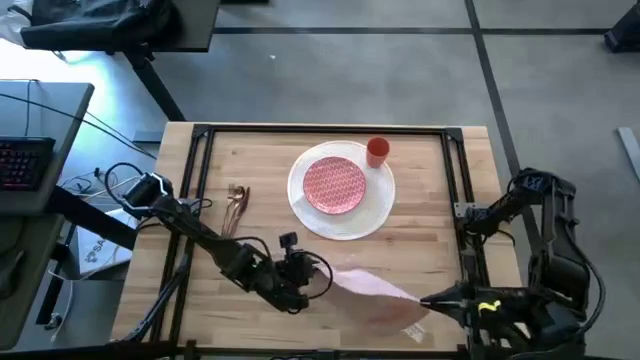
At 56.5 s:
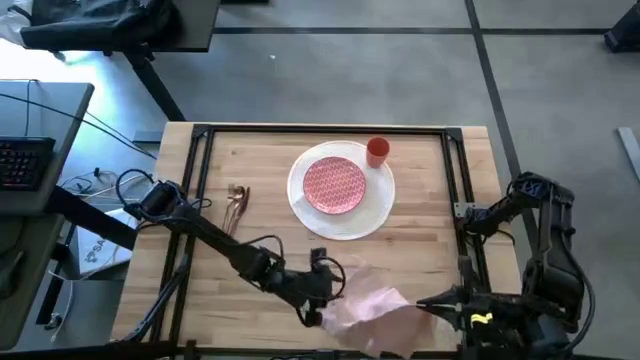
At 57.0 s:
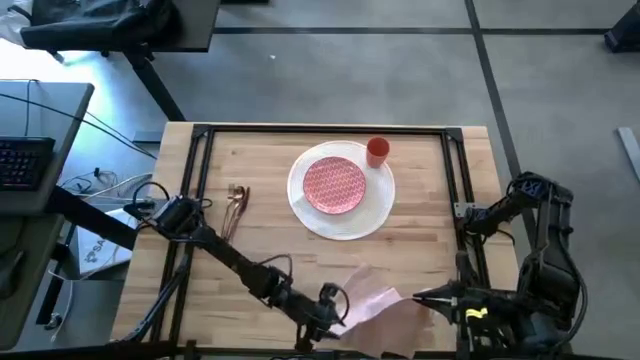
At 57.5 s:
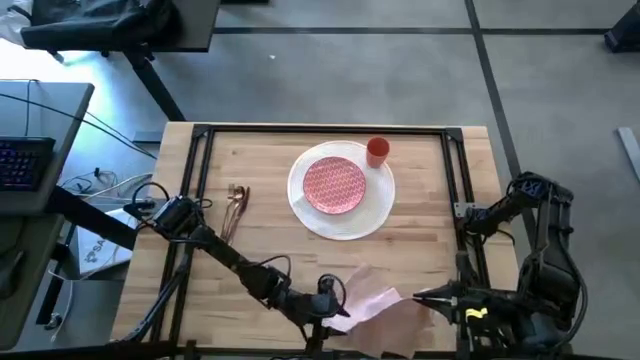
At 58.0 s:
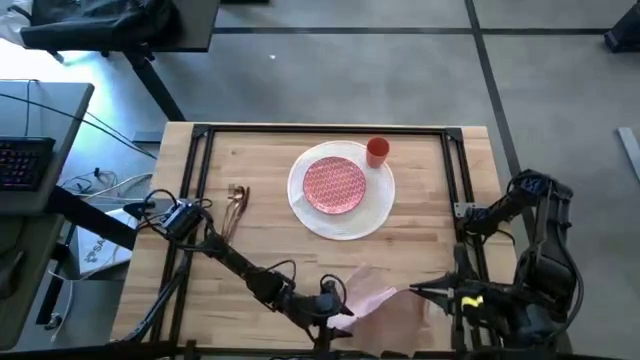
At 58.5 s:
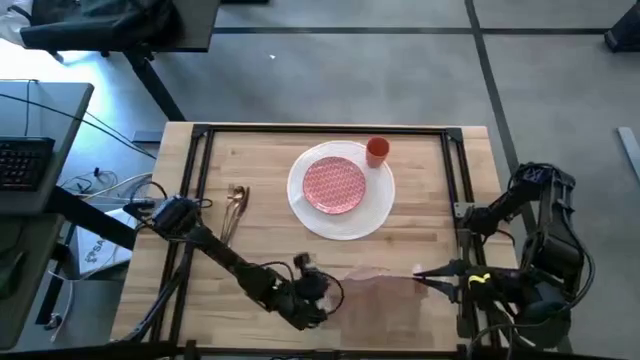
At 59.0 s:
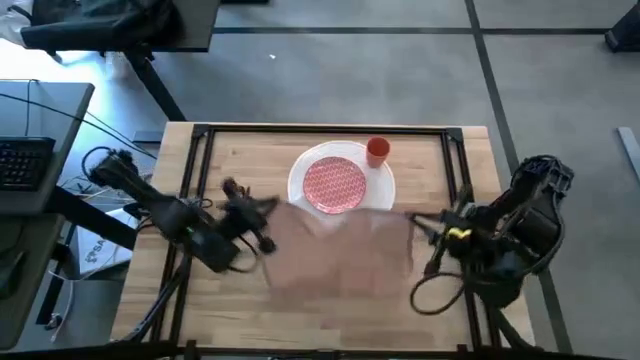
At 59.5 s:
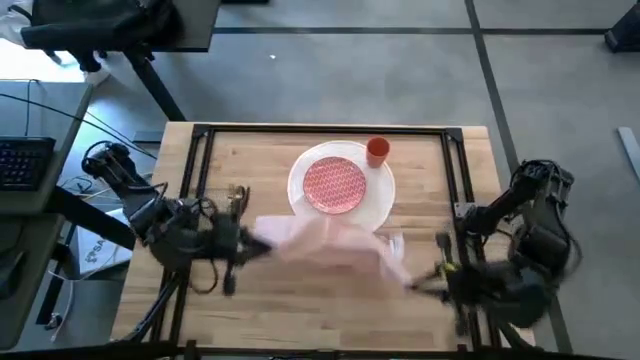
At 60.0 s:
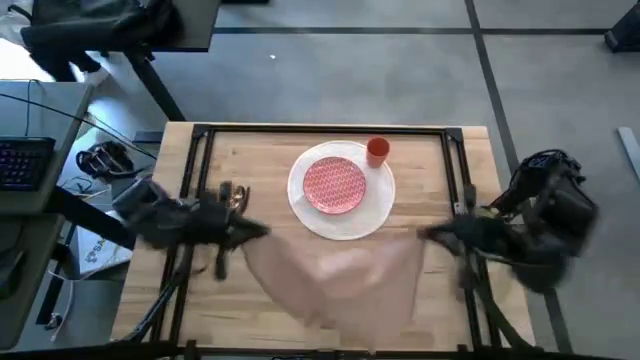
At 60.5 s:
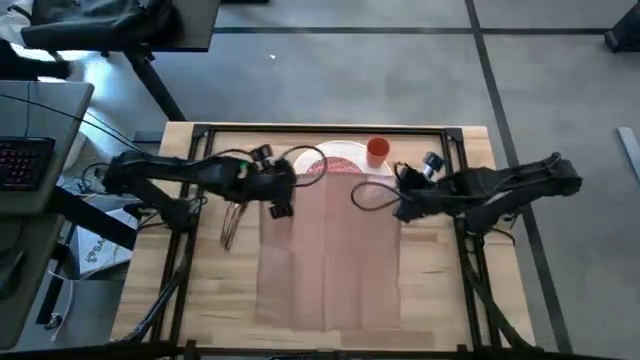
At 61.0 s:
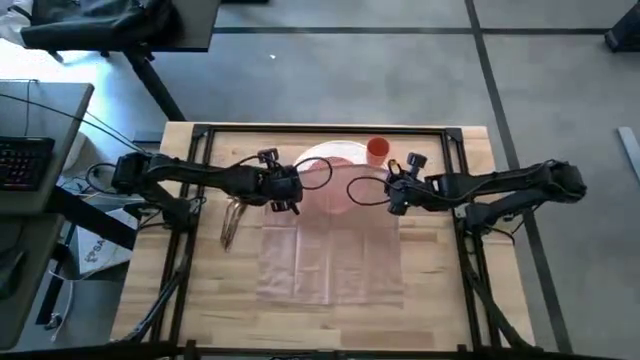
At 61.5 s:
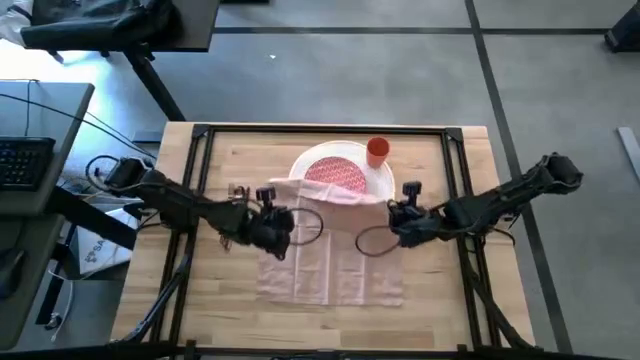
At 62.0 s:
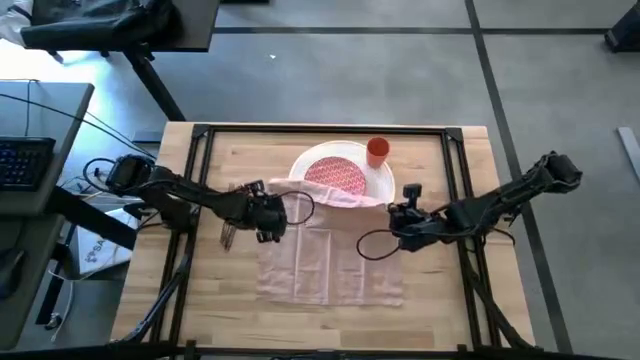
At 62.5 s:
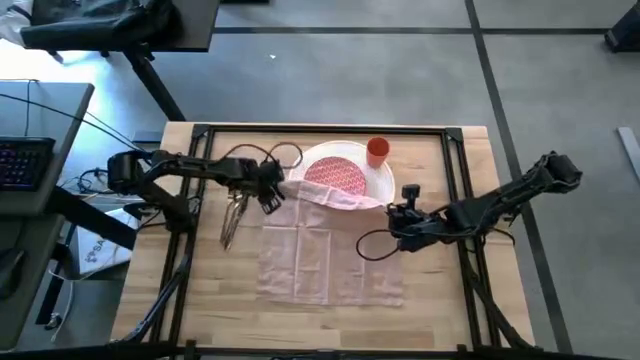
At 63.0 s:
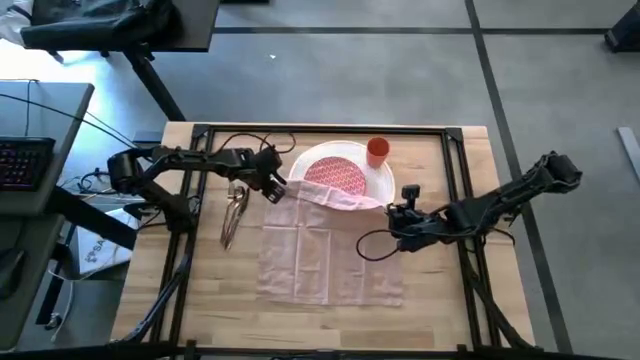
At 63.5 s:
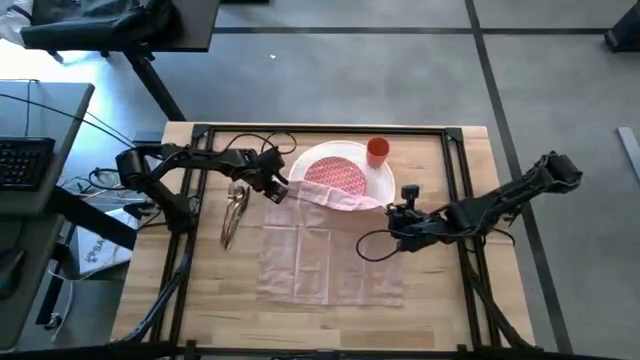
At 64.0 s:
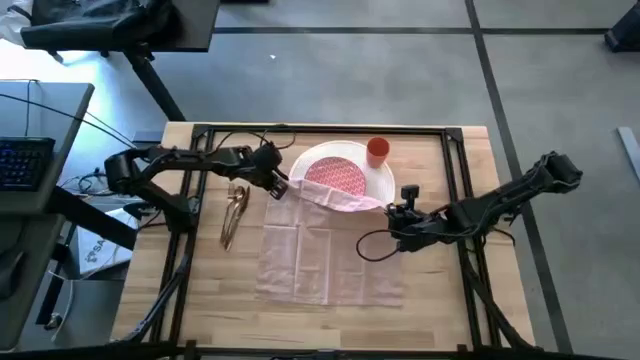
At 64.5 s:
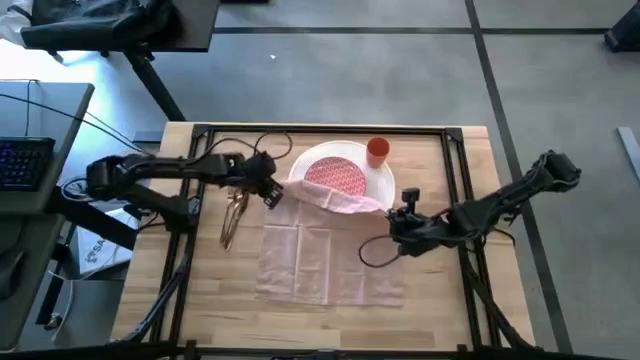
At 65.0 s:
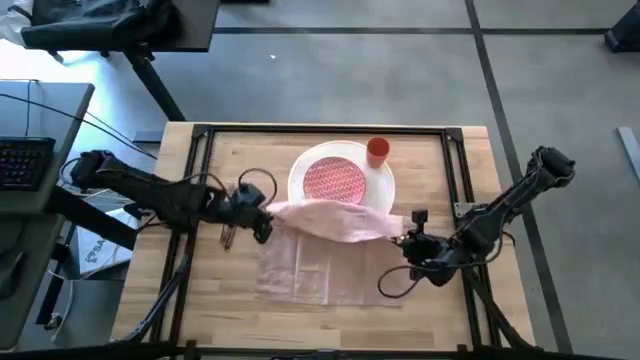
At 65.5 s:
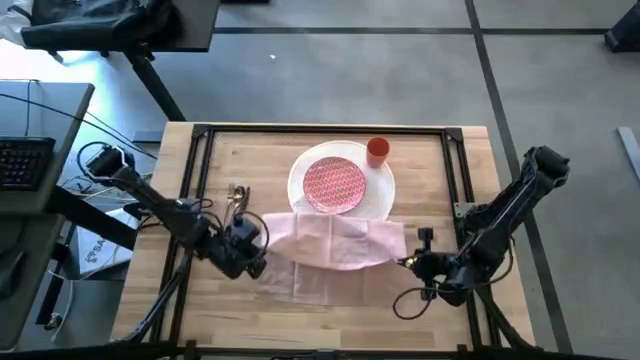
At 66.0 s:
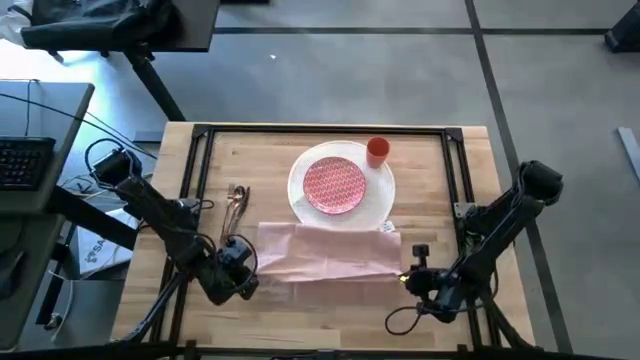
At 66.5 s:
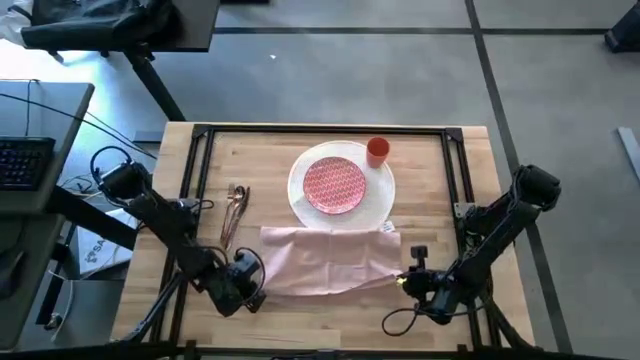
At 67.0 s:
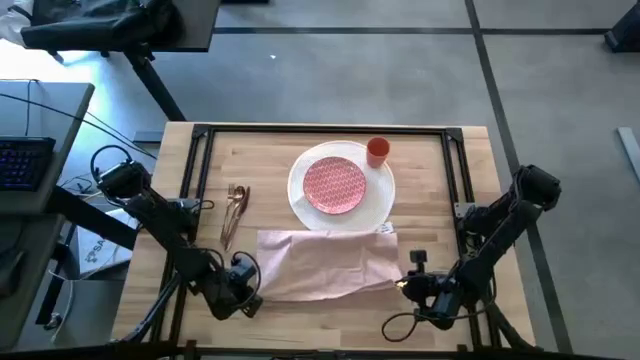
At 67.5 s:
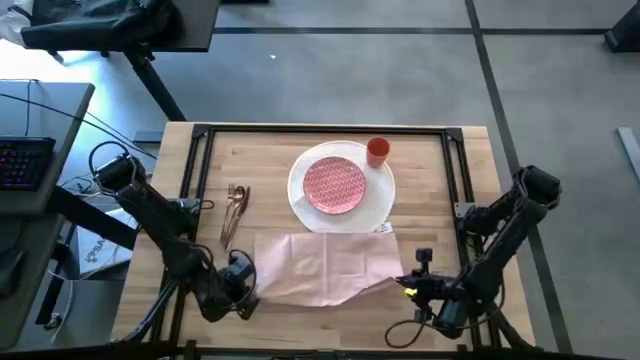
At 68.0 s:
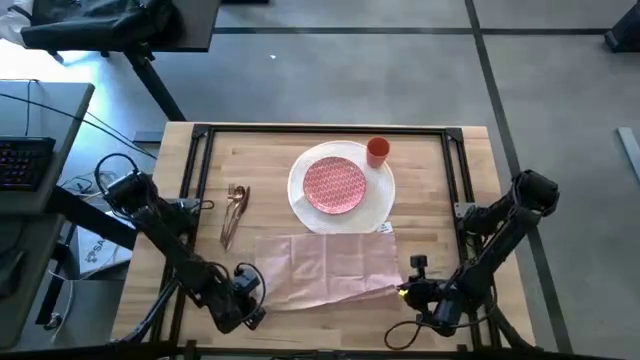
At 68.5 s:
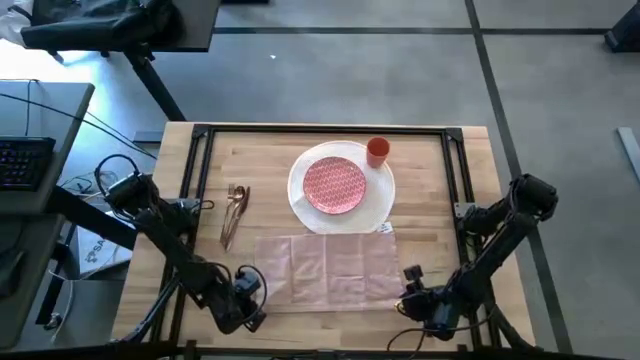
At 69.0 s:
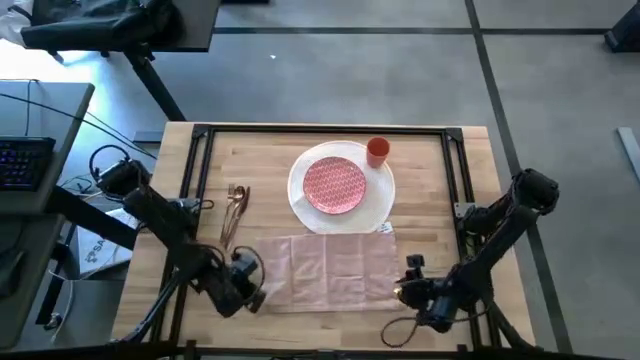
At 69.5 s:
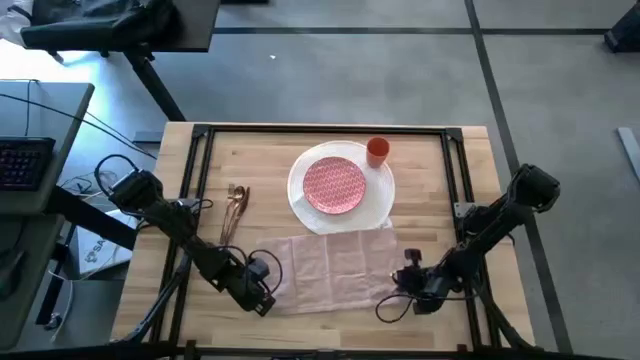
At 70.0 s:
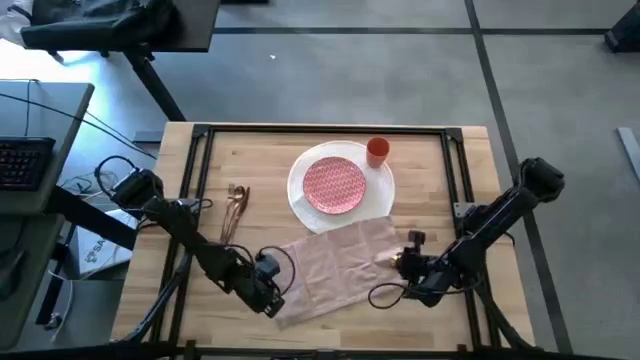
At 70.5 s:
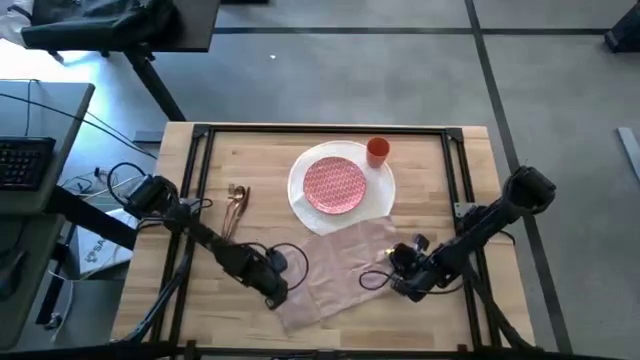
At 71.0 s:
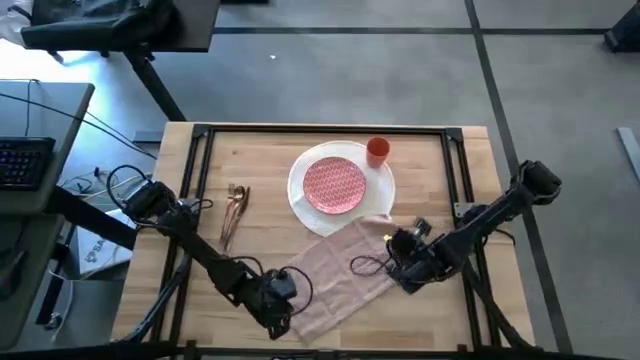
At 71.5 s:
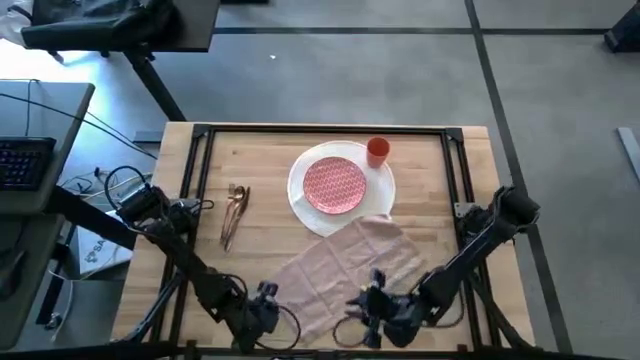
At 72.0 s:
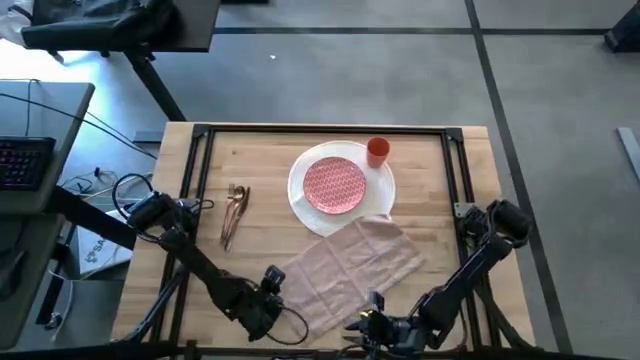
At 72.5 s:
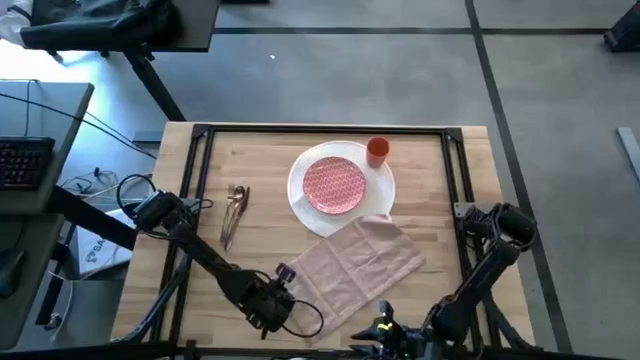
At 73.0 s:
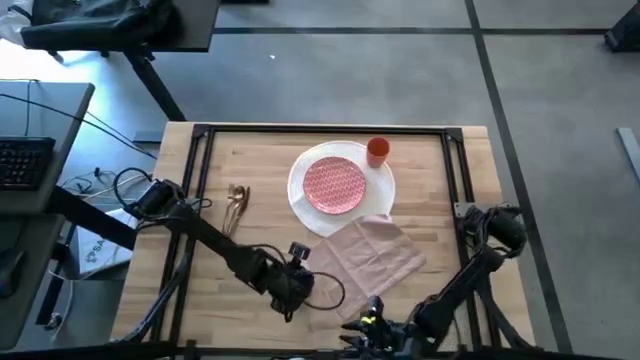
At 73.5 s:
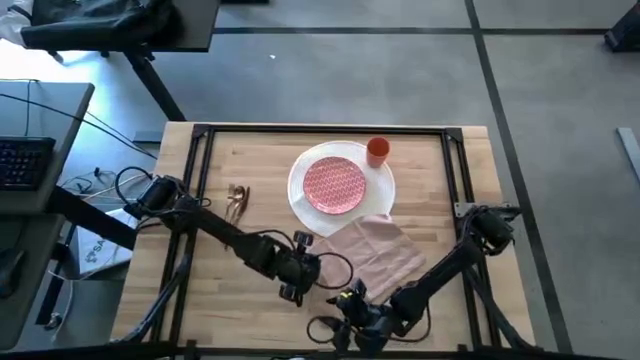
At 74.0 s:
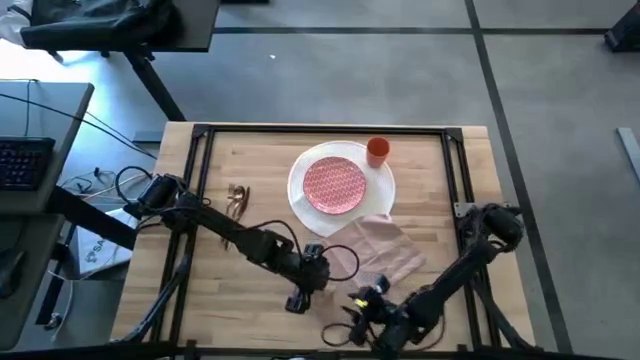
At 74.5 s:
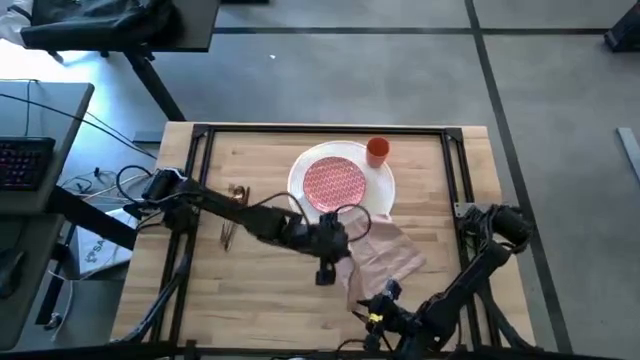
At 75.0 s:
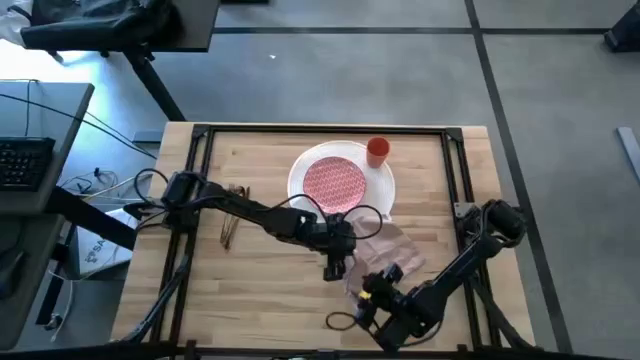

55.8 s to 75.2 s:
Task: Set table place
Fold the napkin

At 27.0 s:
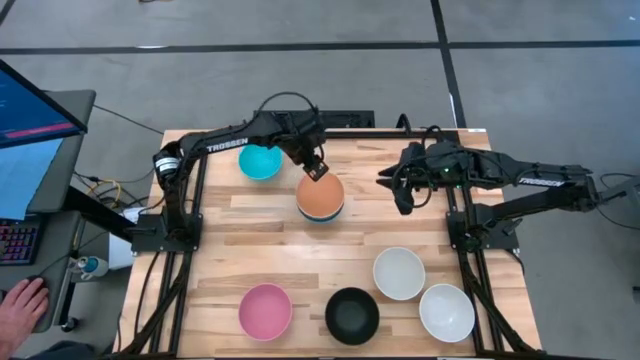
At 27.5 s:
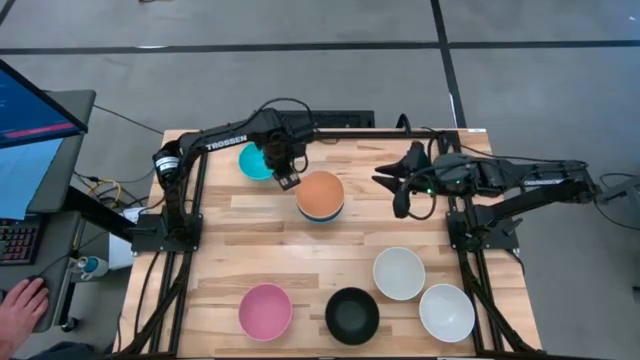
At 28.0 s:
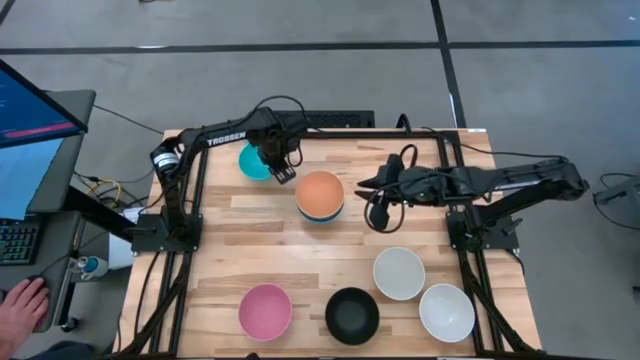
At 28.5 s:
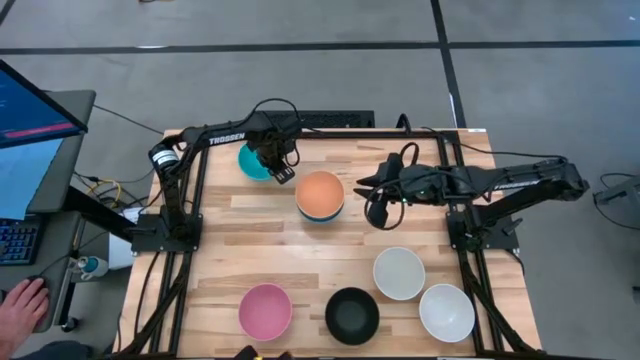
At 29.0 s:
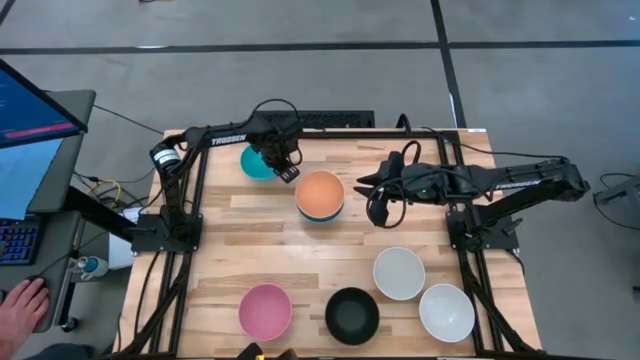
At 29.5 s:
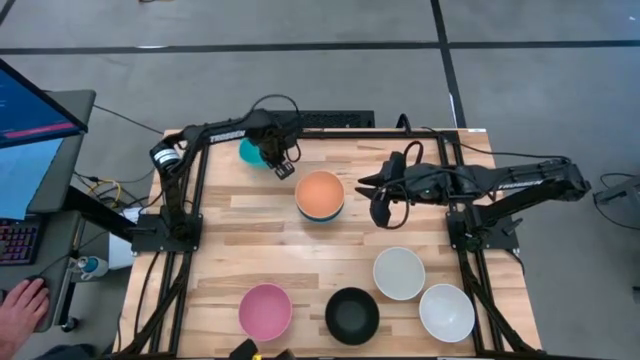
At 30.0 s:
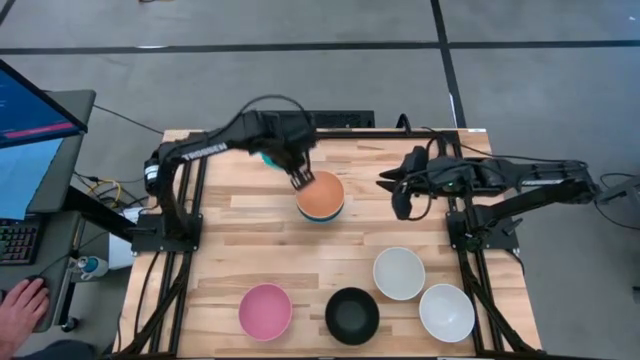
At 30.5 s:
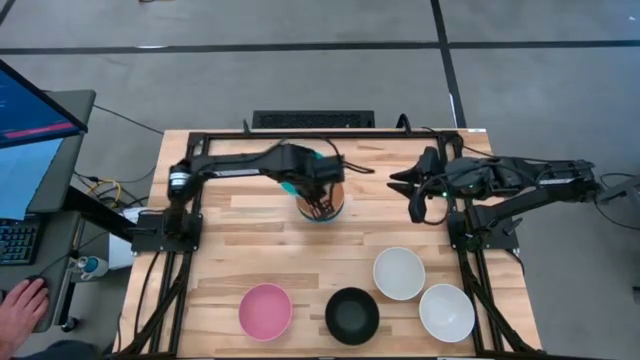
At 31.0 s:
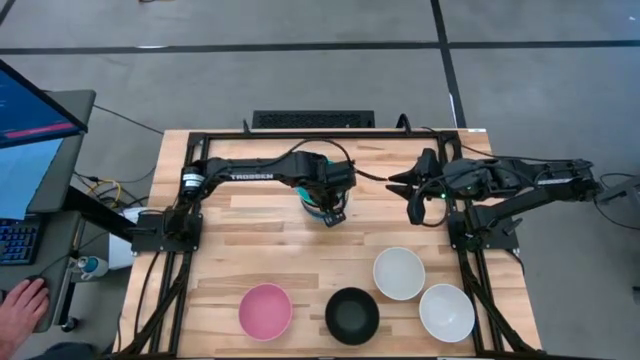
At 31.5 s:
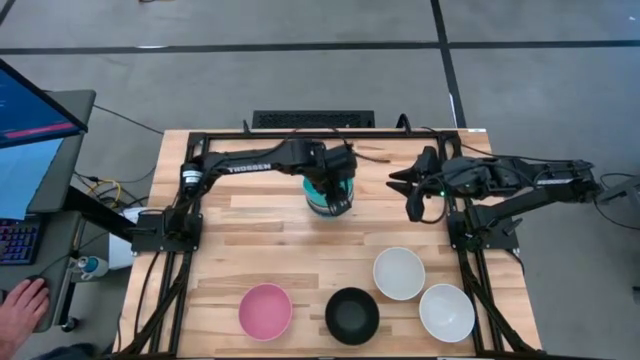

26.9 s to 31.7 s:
Task: Nest bowls inside each other
Stack the light blue bowl on top of the orange bowl
